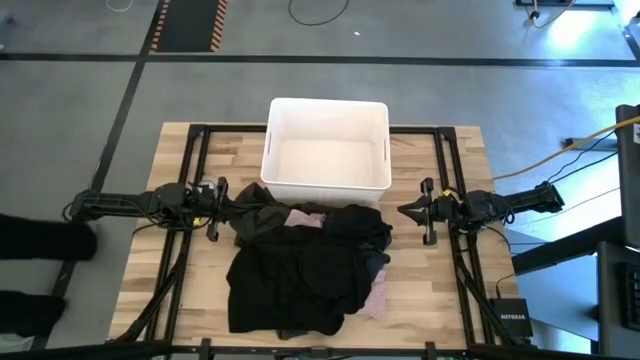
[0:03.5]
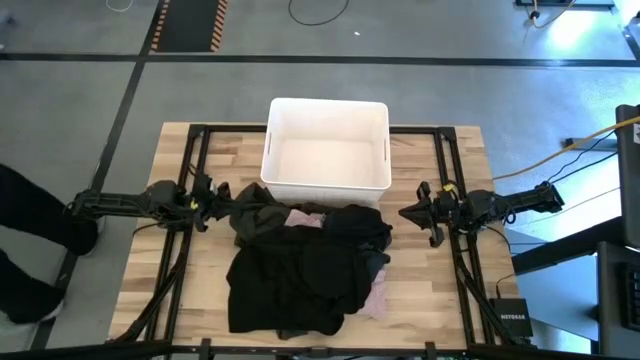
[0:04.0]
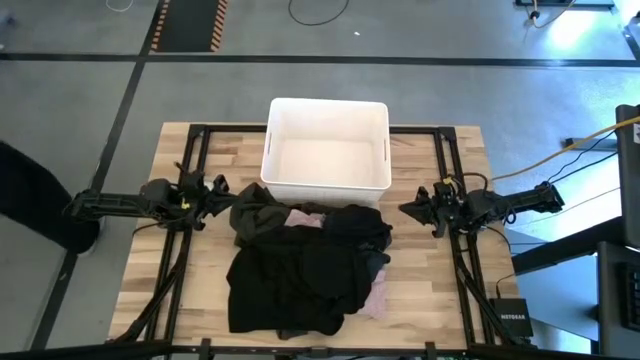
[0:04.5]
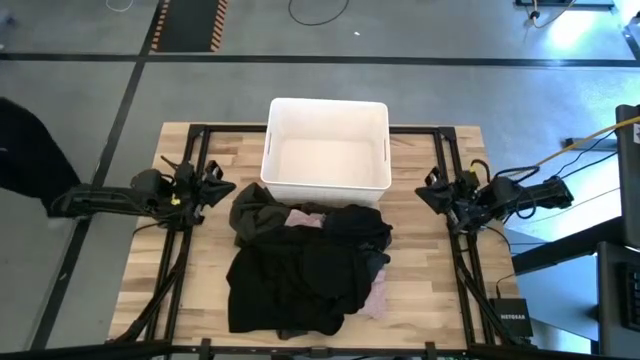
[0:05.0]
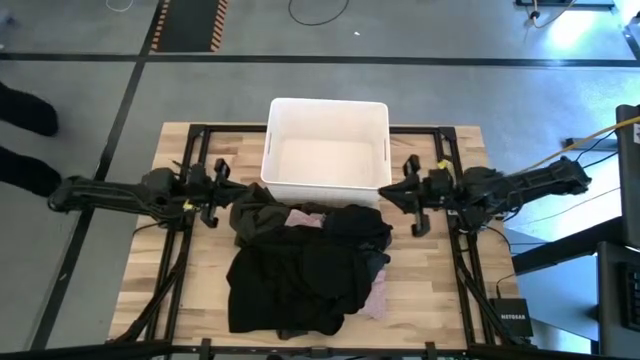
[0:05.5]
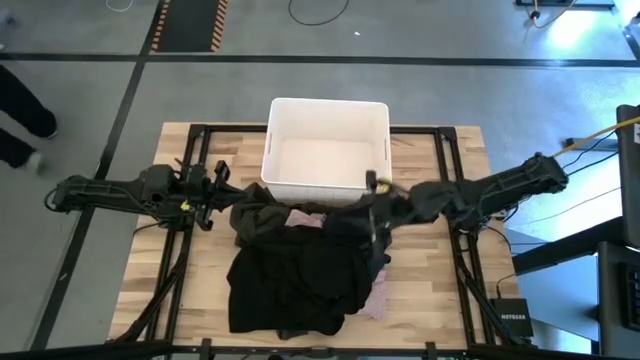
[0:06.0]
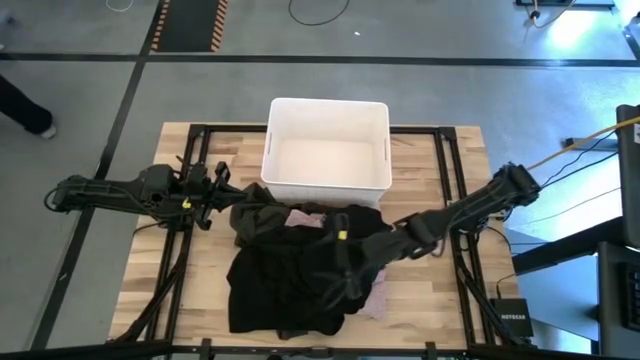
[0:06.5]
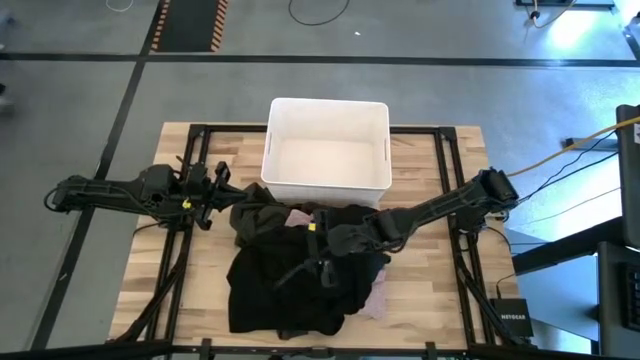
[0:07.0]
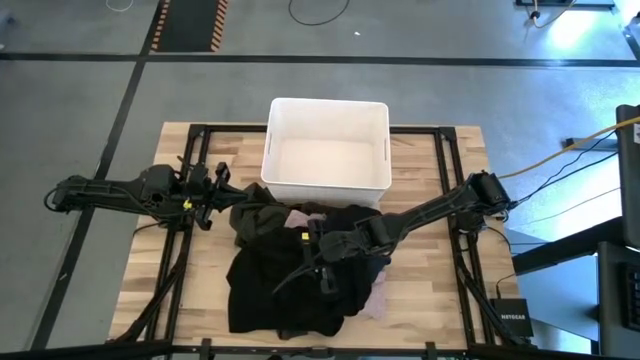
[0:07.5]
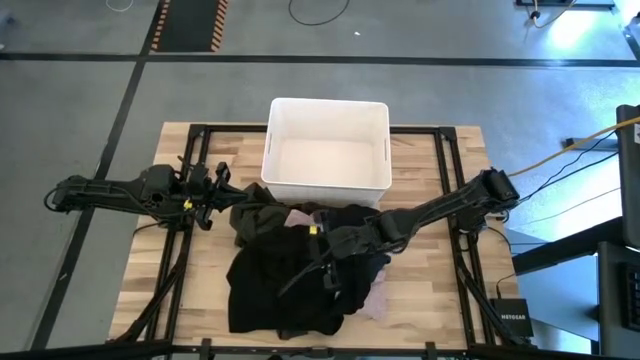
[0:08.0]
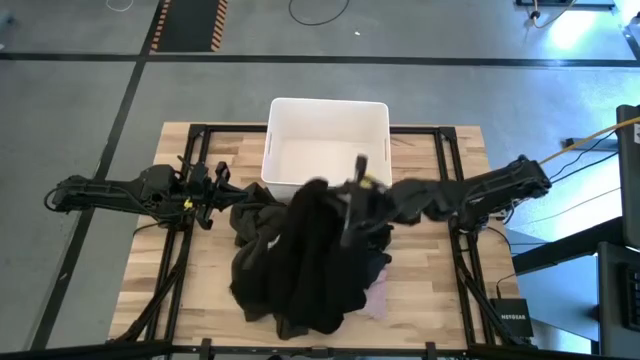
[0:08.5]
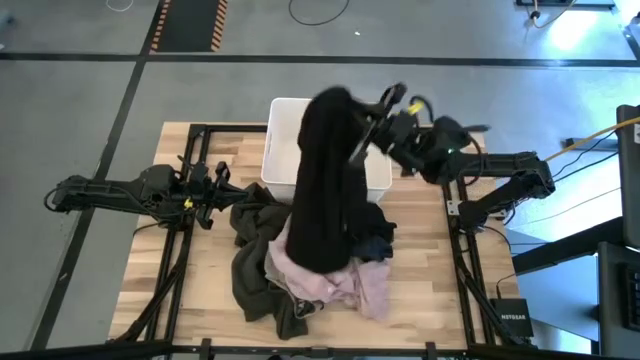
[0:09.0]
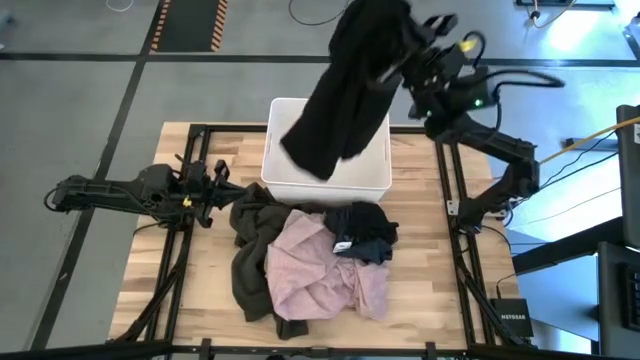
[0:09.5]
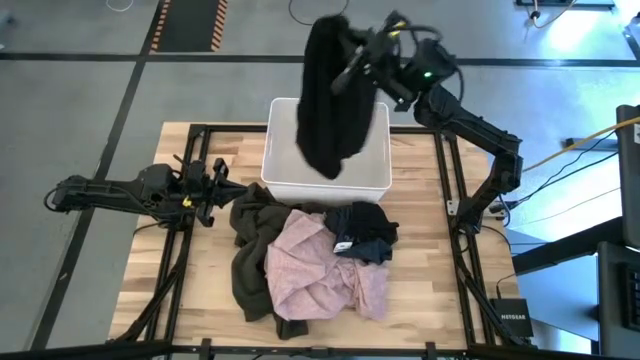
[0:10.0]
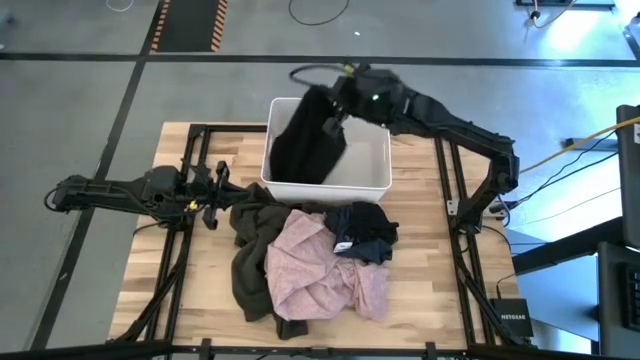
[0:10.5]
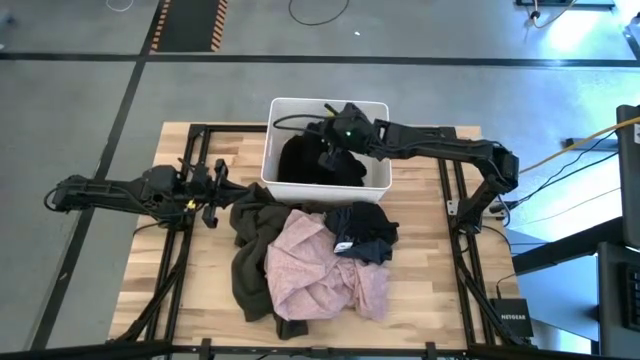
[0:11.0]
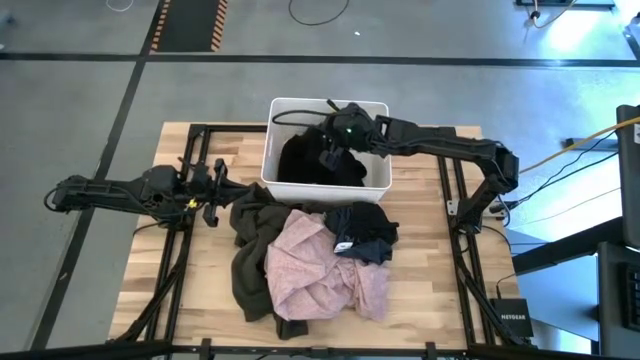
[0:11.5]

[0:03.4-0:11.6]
Task: Sort clothes
Put the black shirt into the white laundry bin

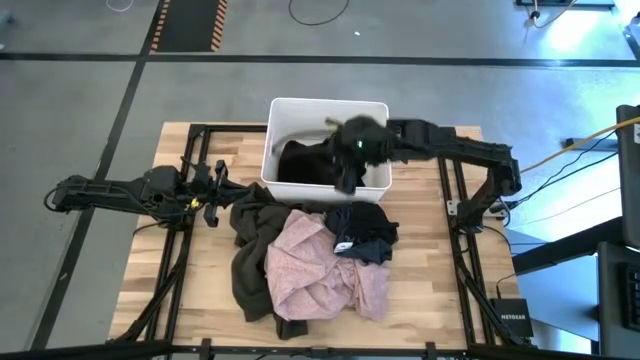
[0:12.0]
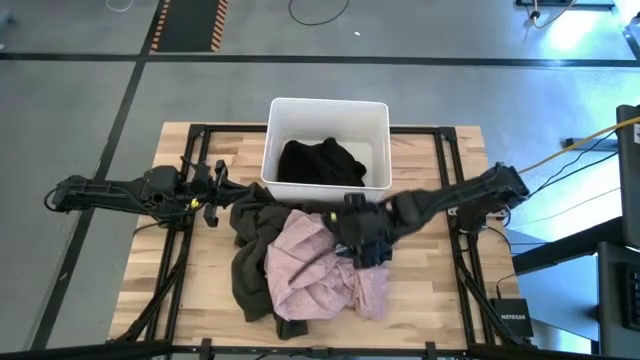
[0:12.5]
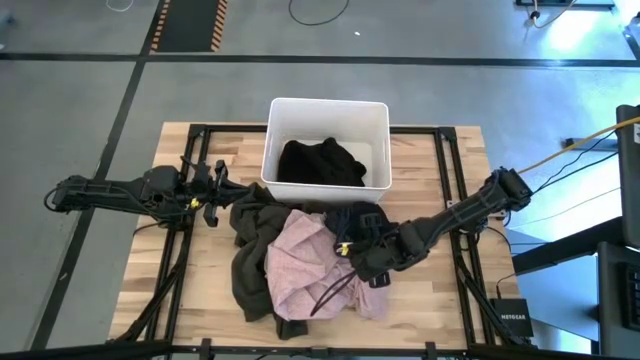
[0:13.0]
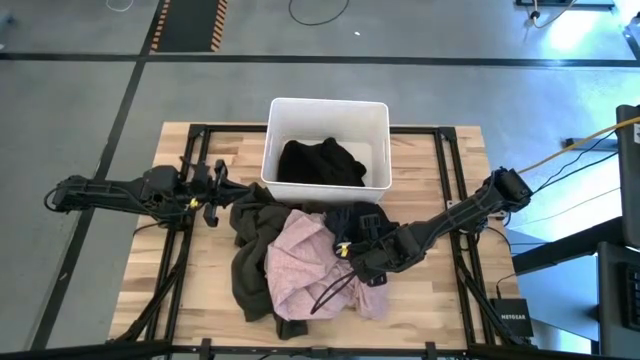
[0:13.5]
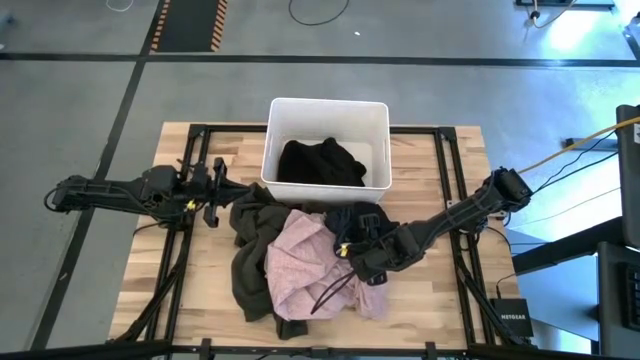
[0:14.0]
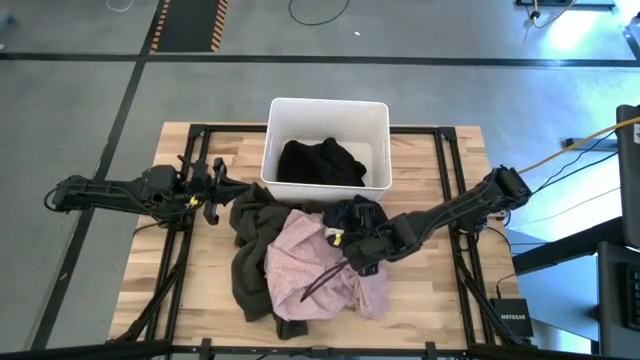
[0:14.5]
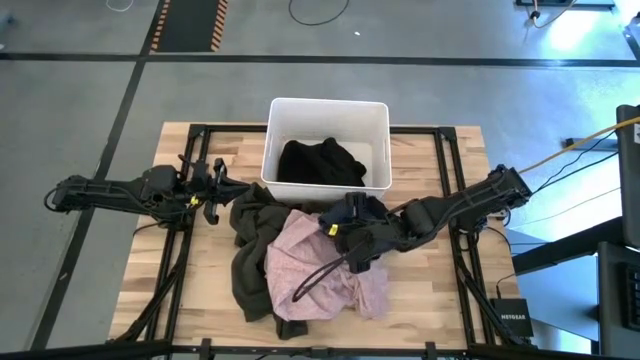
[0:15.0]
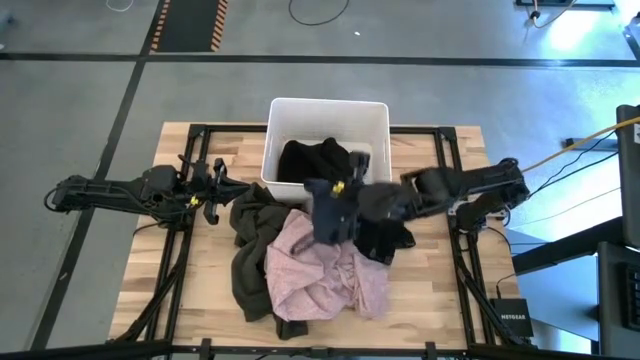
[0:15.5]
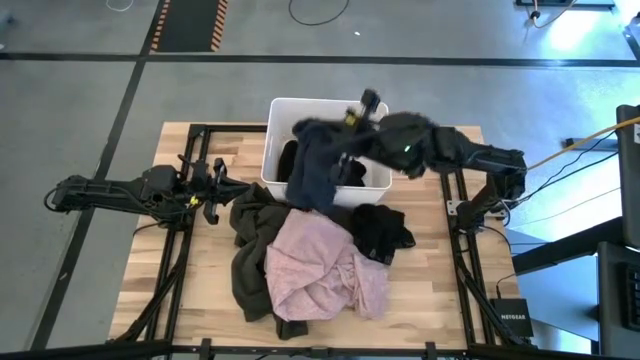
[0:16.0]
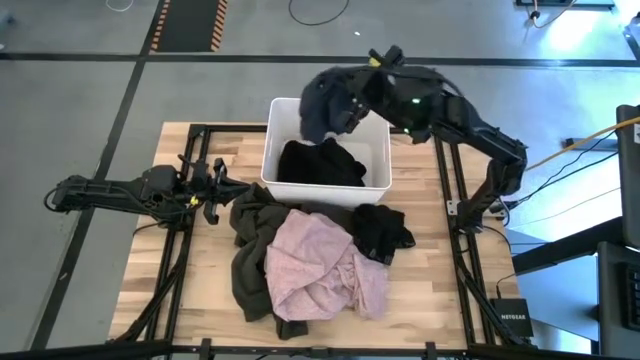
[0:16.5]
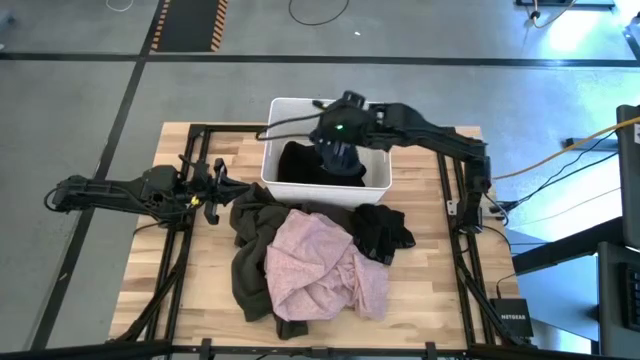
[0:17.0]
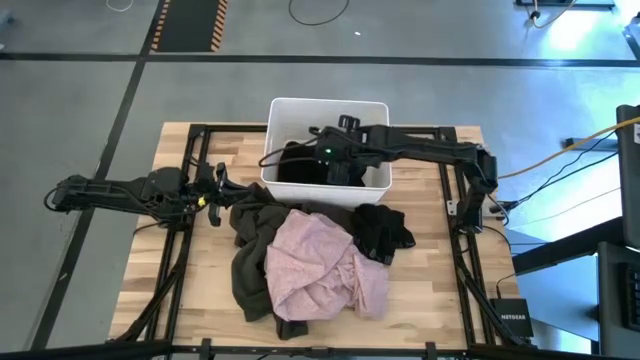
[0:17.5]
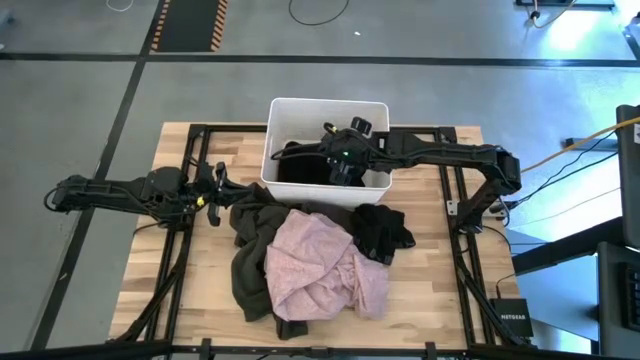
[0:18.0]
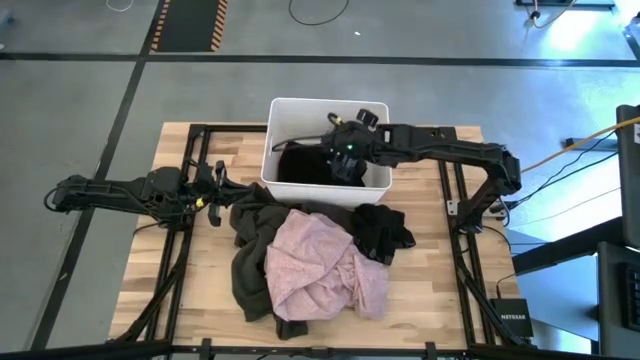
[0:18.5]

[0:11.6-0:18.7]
Put the blue boxer into the white laundry bin

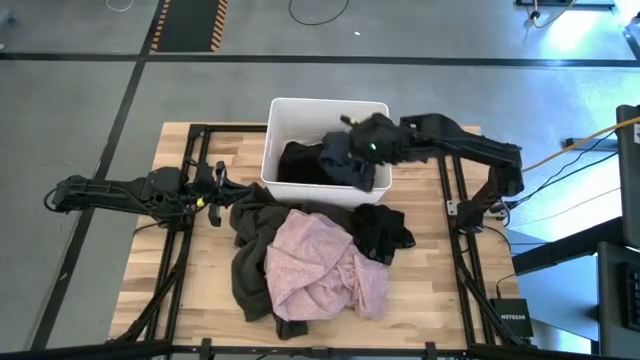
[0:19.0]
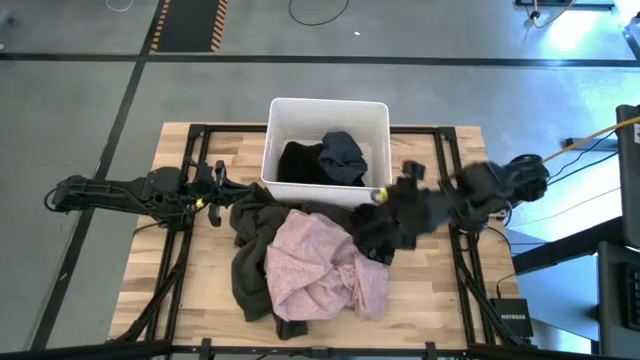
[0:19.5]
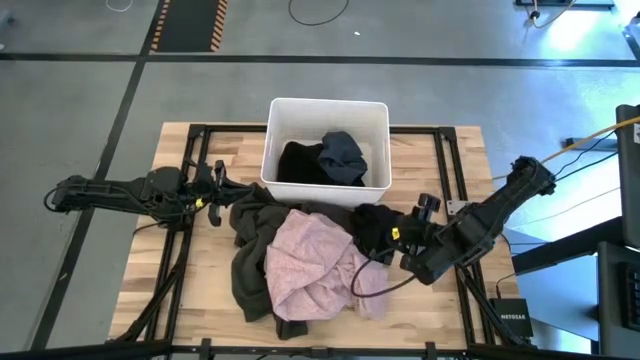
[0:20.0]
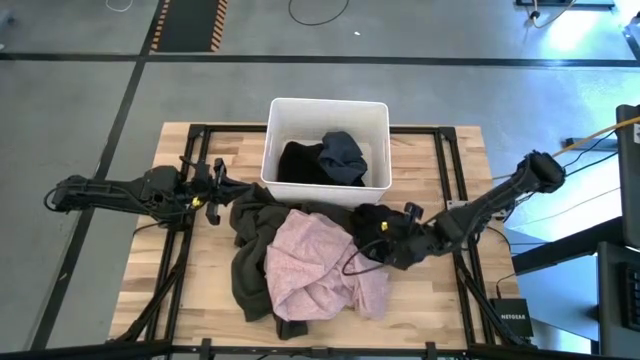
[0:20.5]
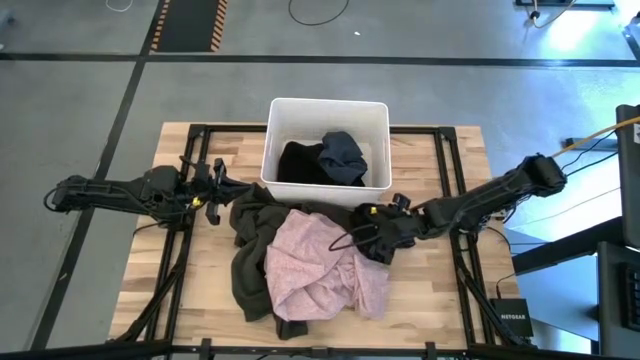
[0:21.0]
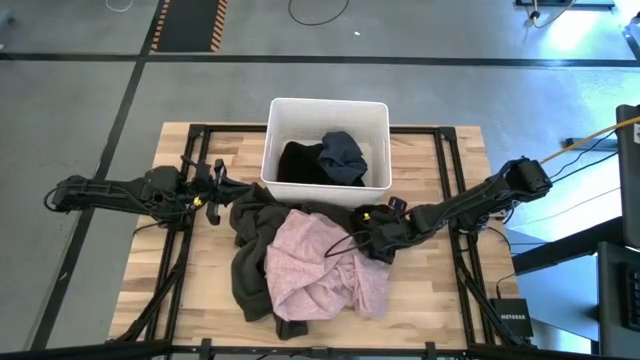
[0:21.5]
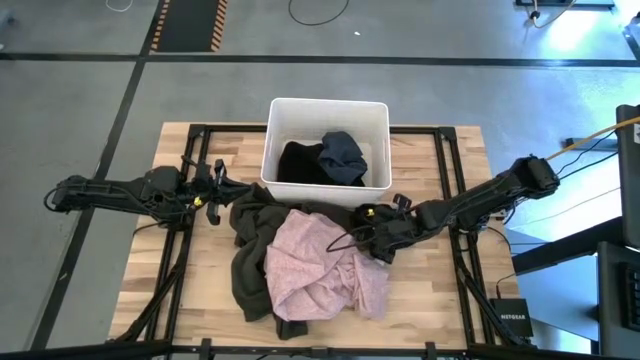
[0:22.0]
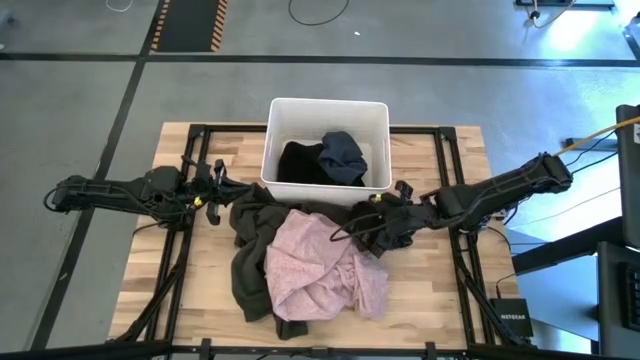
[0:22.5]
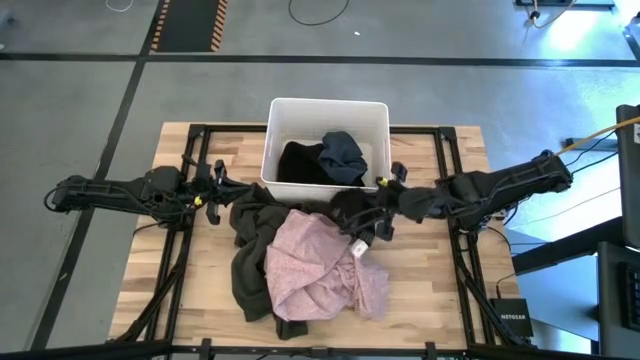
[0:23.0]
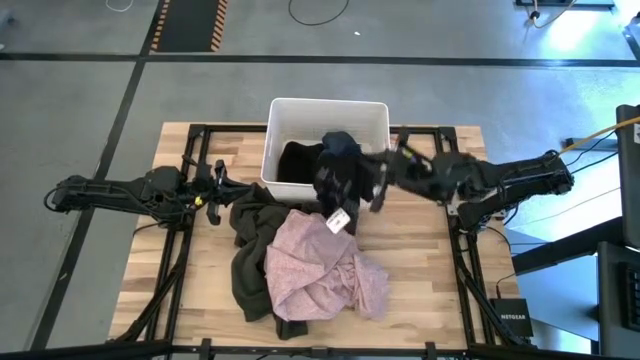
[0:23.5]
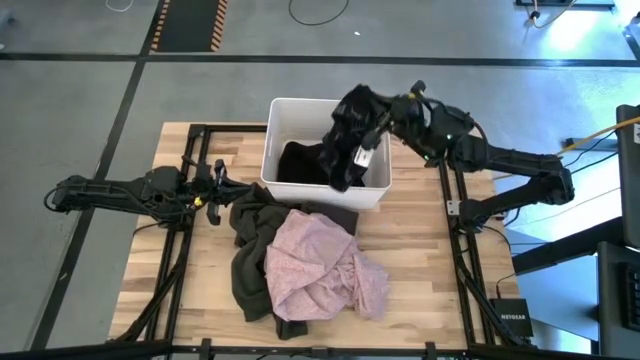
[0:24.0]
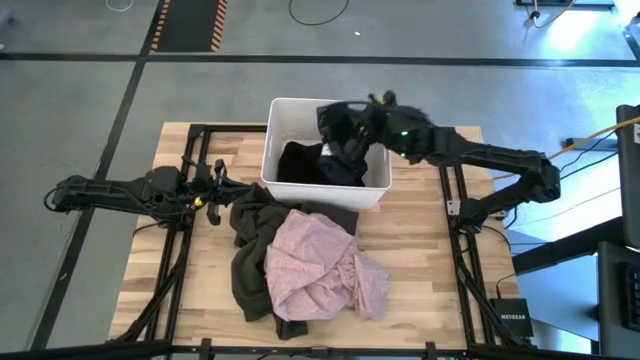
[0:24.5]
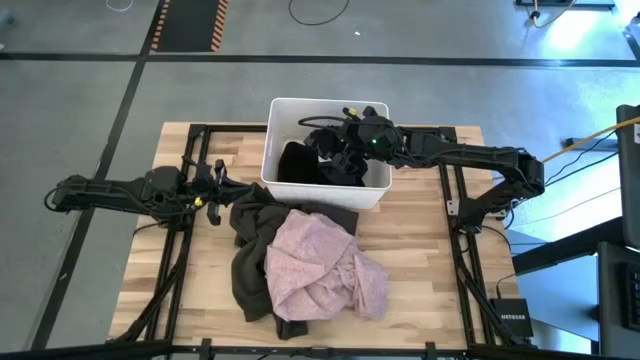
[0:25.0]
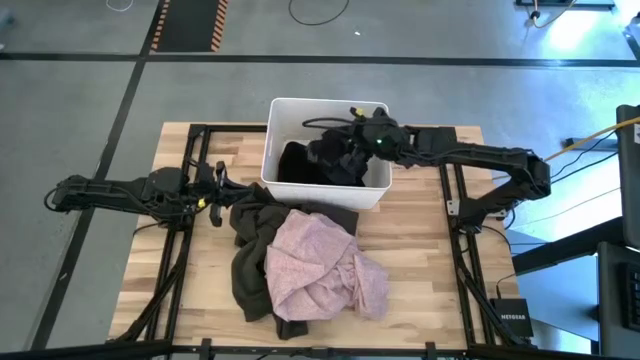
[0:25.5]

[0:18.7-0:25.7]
Put the black boxer into the white laundry bin
